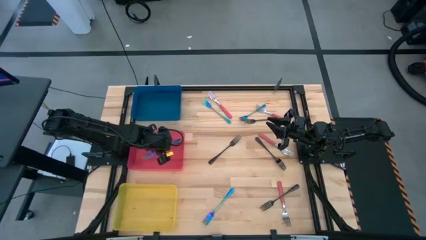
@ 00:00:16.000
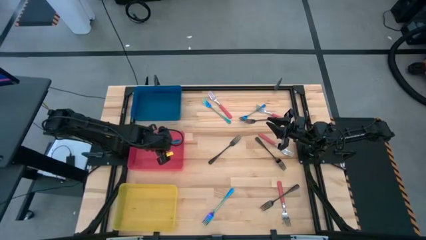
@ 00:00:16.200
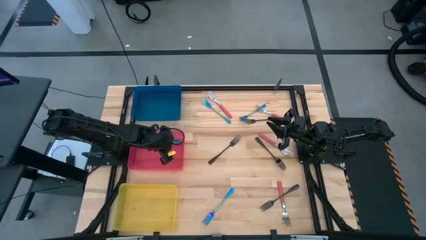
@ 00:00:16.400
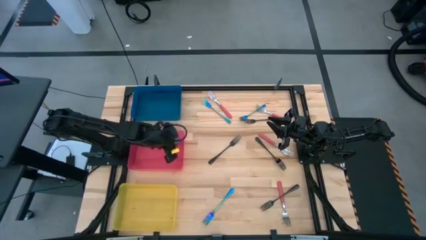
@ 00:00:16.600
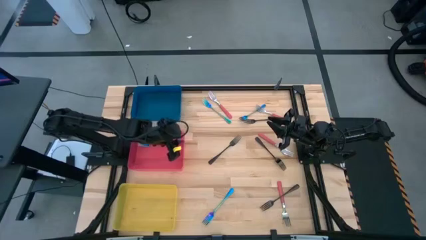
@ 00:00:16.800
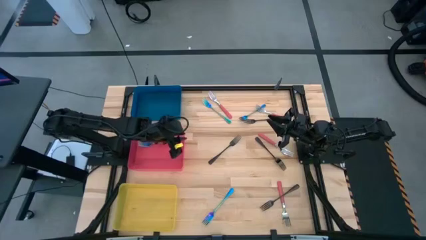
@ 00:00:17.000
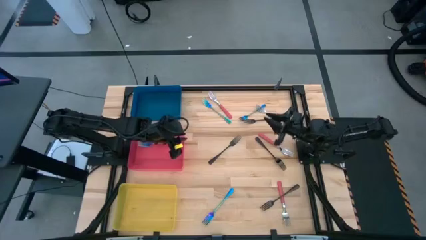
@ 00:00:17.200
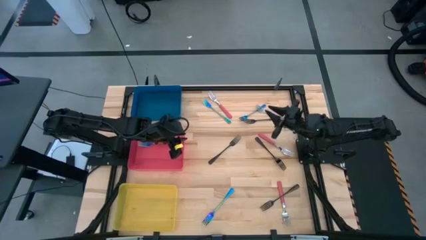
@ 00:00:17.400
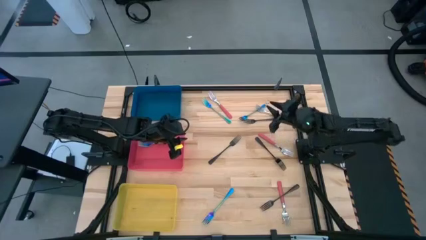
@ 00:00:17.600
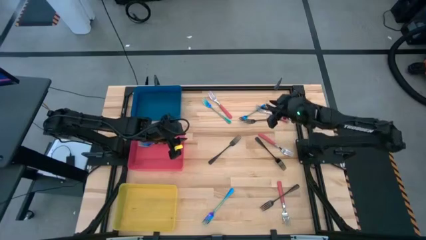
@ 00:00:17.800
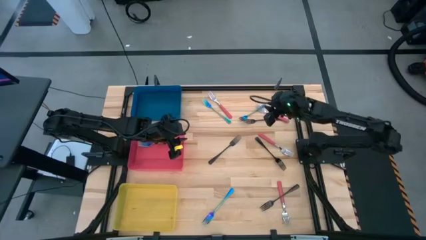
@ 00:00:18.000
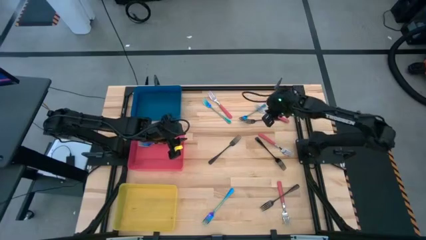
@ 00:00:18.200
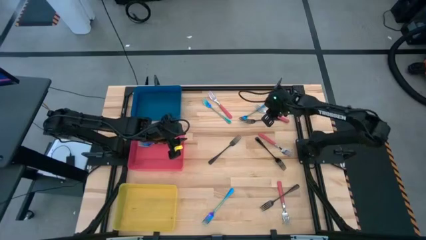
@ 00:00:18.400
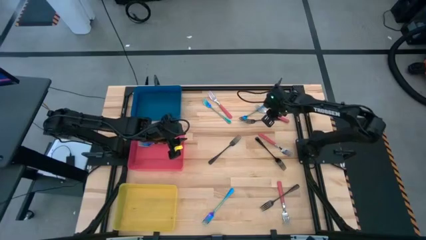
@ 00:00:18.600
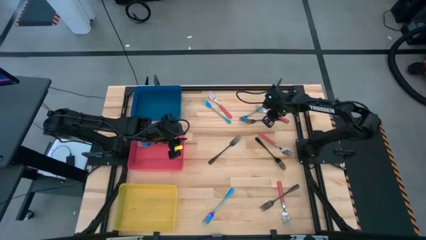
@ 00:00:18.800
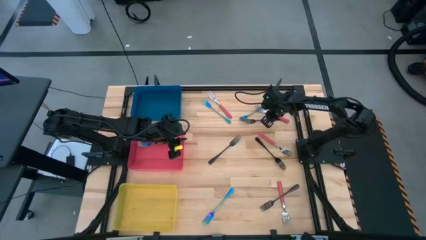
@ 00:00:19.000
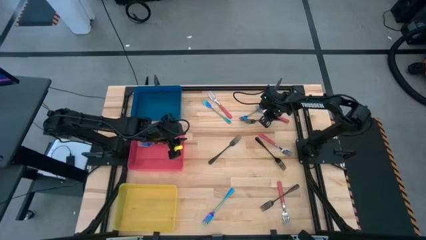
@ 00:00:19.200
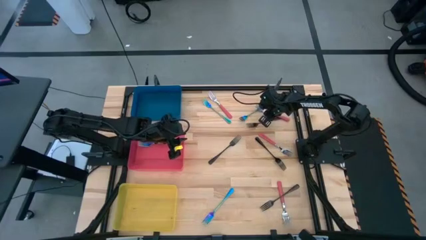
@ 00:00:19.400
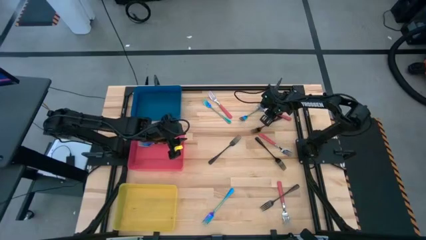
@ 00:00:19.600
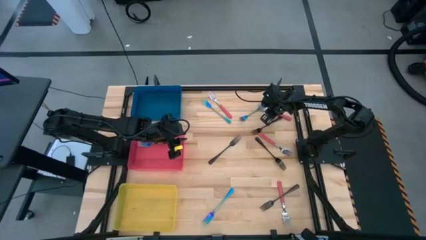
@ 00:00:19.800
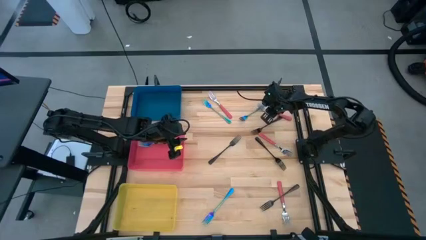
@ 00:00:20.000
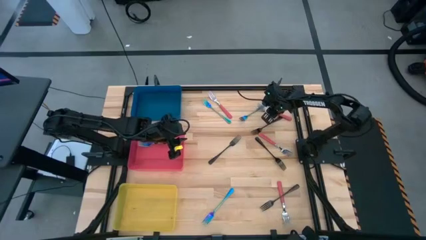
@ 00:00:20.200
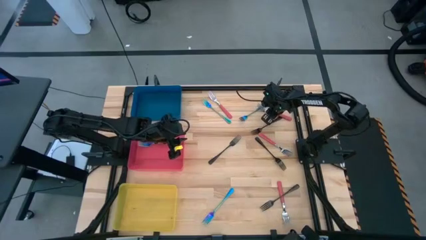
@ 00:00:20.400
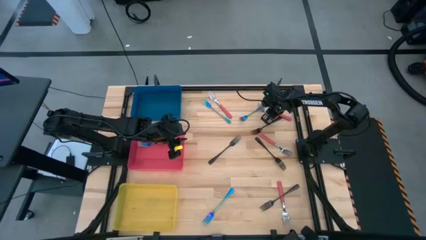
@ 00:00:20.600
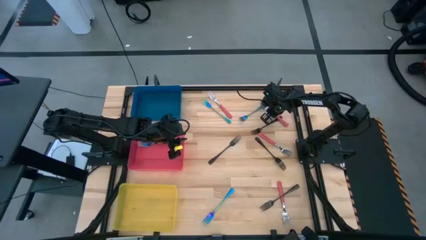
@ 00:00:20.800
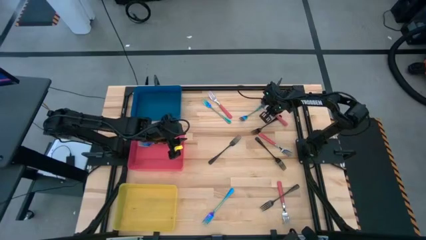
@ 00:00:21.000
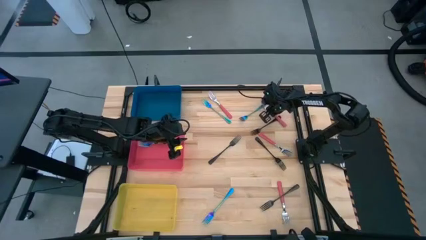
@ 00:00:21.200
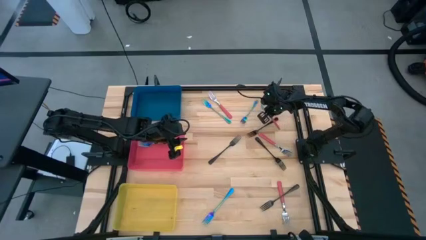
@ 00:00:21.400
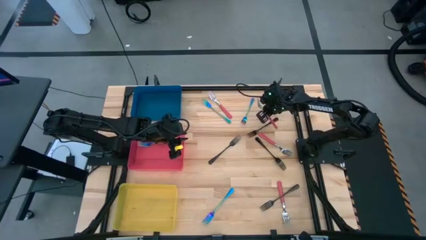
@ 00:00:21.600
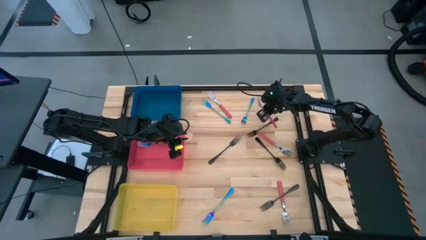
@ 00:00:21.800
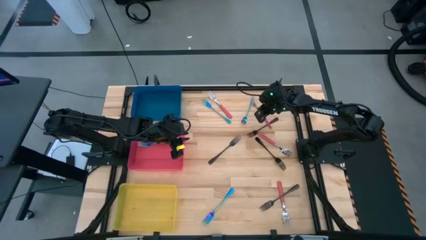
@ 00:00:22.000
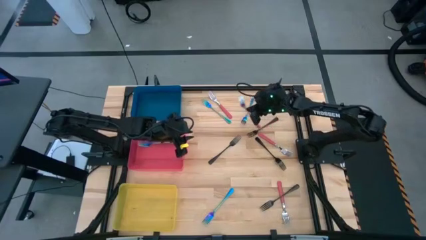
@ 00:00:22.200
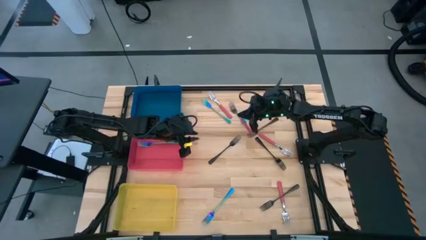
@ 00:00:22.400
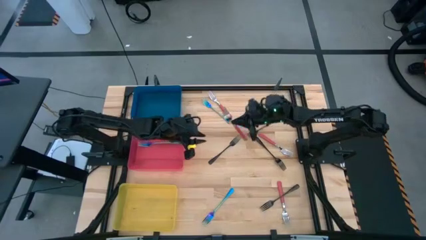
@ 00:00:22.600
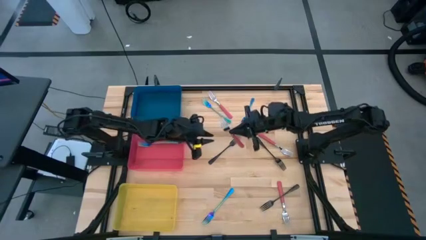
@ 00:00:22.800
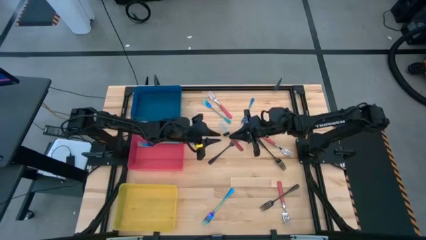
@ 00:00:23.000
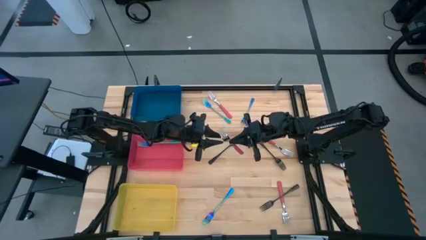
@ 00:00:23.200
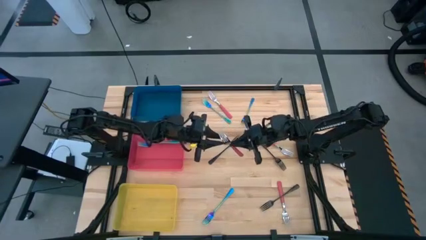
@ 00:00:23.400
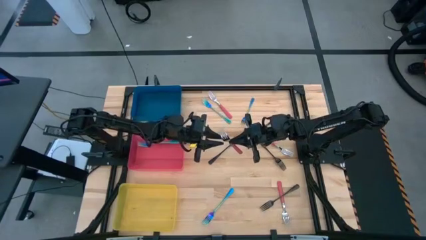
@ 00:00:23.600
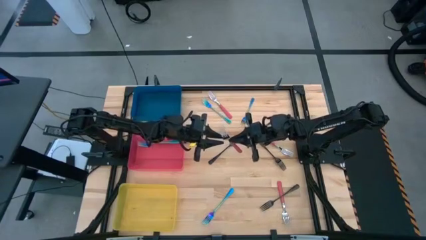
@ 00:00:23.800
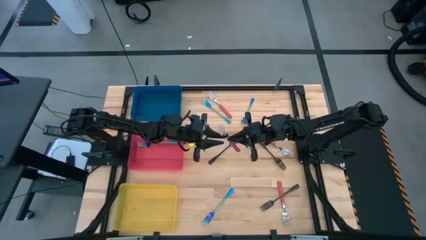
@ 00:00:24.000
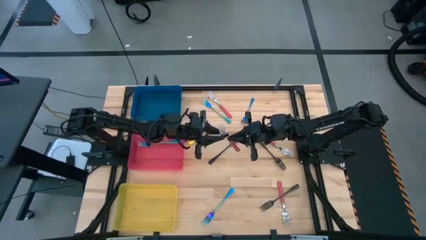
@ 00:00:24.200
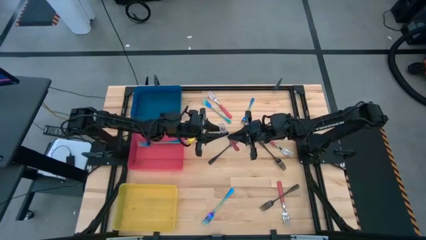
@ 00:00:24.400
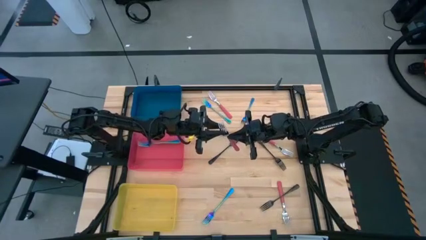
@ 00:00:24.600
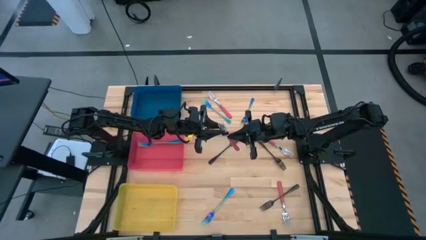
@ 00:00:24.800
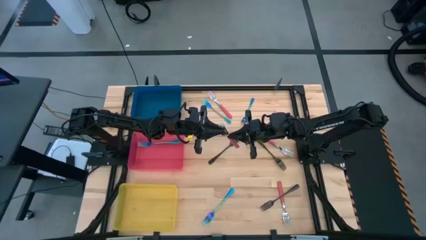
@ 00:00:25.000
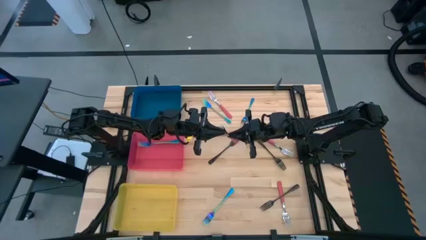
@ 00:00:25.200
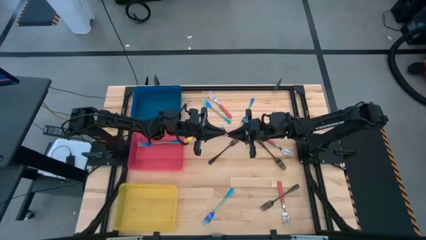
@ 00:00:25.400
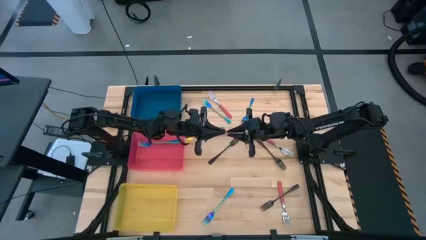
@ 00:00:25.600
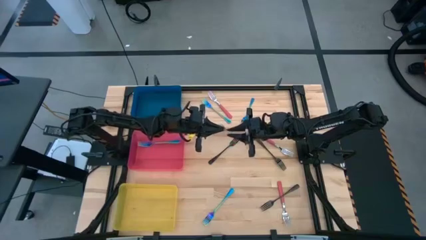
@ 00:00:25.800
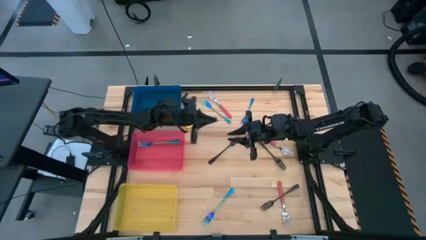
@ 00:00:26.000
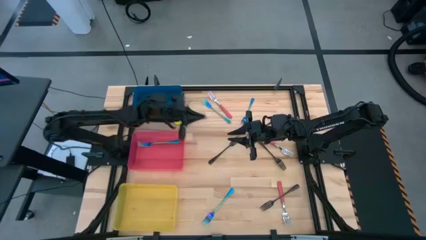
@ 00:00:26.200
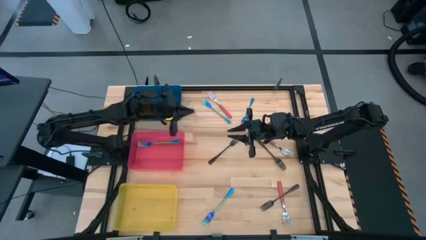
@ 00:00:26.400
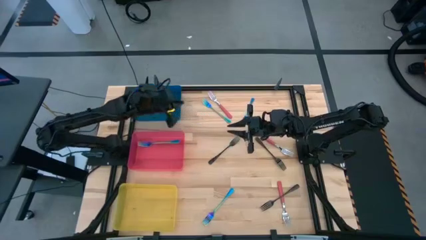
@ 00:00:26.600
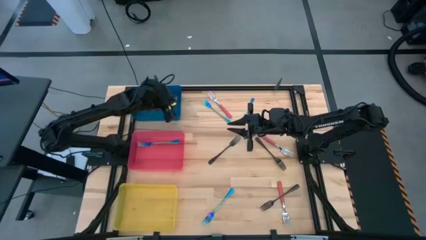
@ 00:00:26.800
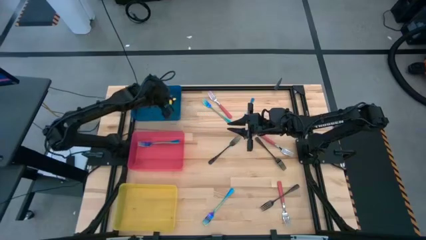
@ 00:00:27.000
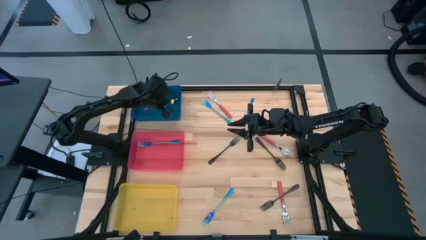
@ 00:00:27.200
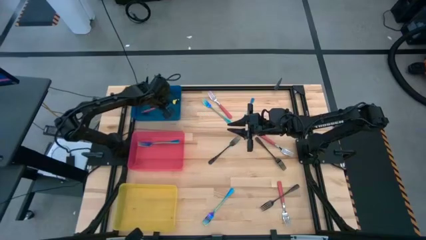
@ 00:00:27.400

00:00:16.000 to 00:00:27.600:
Task: Sort silverware by color (type)
Put the pink fork into the blue bin

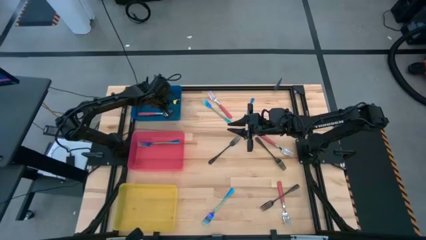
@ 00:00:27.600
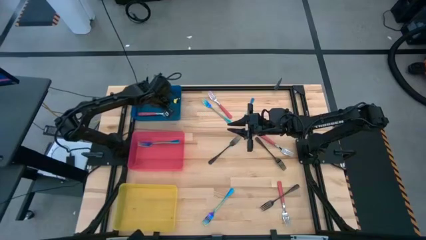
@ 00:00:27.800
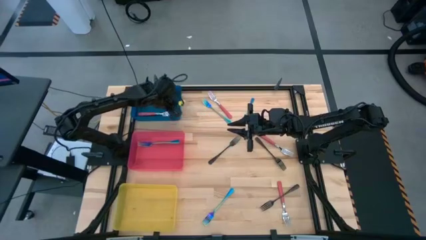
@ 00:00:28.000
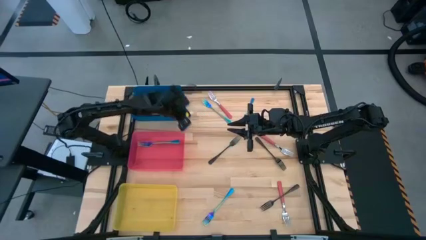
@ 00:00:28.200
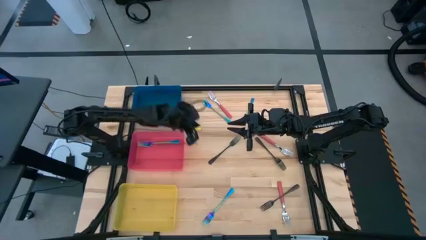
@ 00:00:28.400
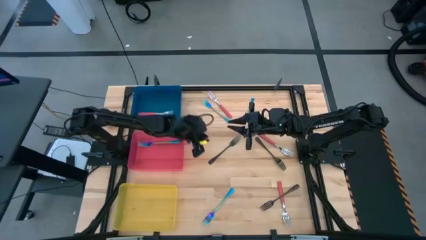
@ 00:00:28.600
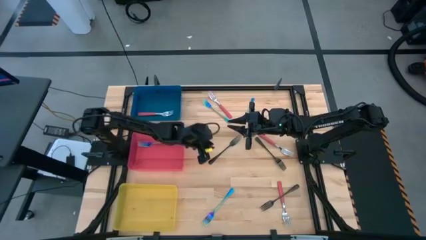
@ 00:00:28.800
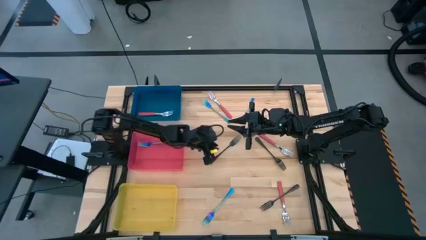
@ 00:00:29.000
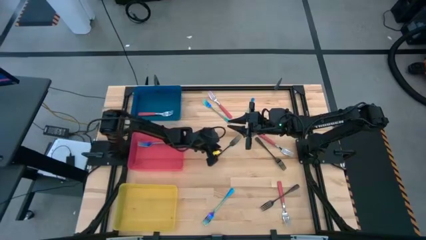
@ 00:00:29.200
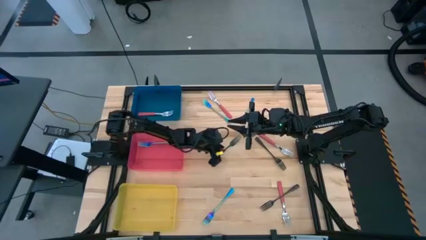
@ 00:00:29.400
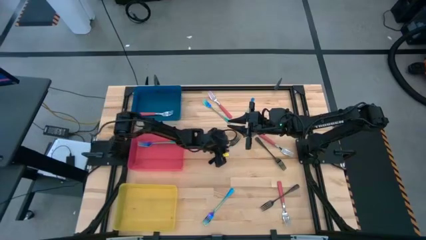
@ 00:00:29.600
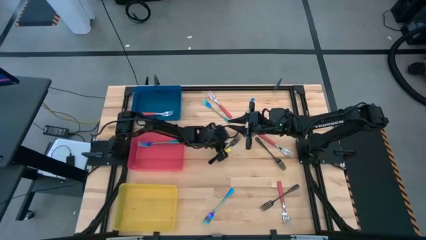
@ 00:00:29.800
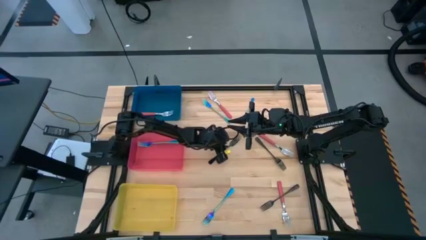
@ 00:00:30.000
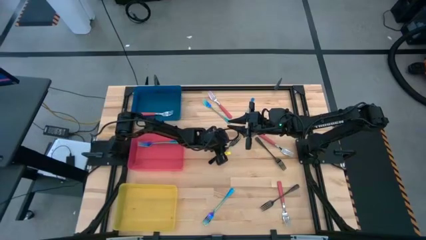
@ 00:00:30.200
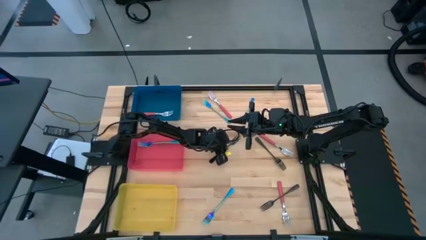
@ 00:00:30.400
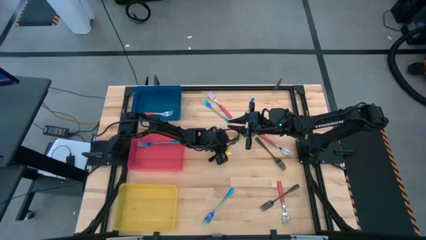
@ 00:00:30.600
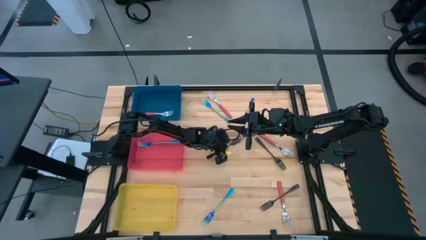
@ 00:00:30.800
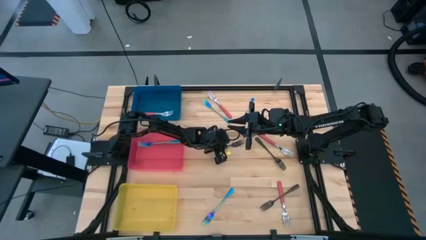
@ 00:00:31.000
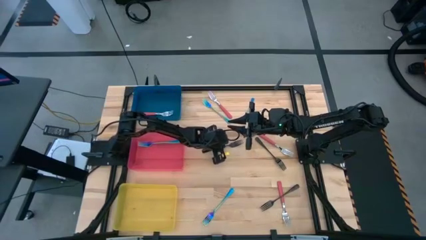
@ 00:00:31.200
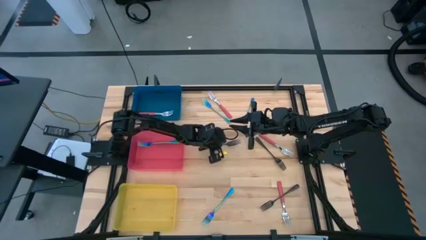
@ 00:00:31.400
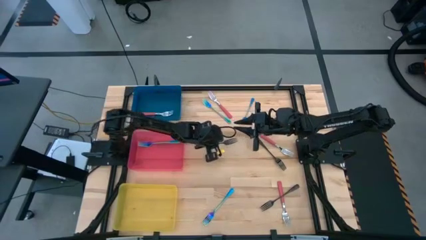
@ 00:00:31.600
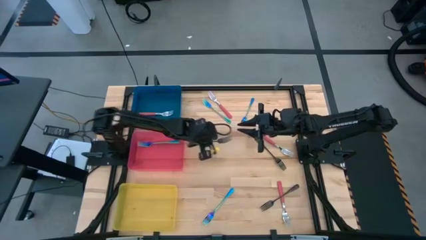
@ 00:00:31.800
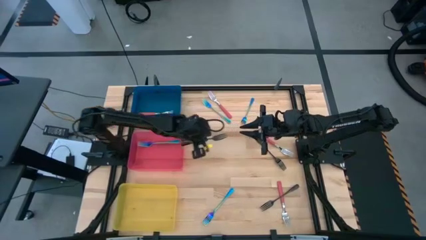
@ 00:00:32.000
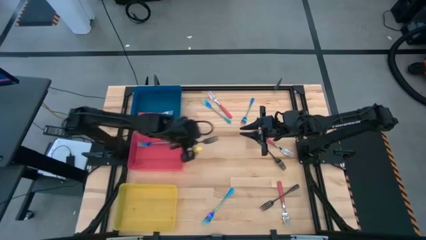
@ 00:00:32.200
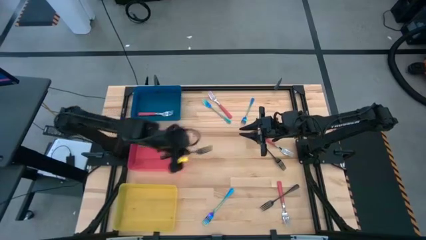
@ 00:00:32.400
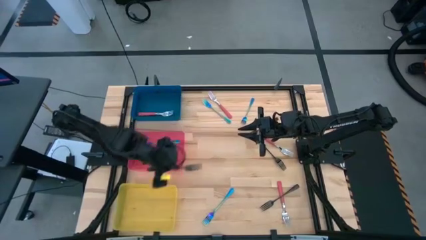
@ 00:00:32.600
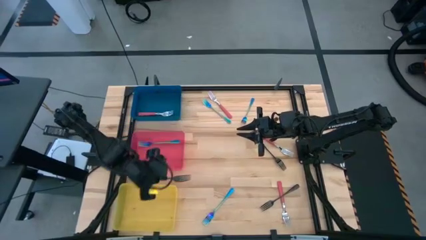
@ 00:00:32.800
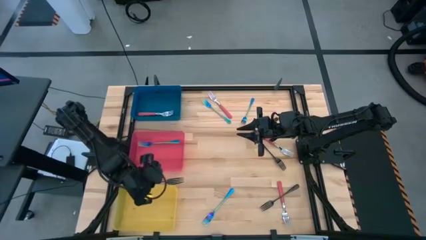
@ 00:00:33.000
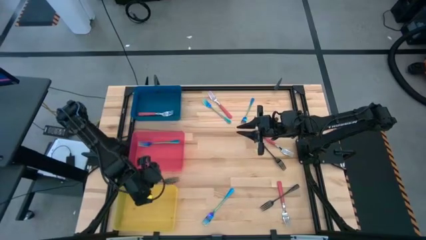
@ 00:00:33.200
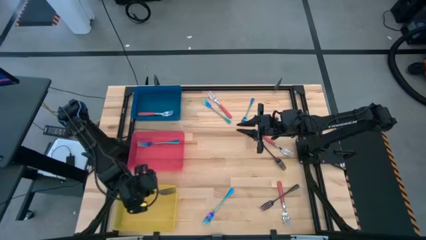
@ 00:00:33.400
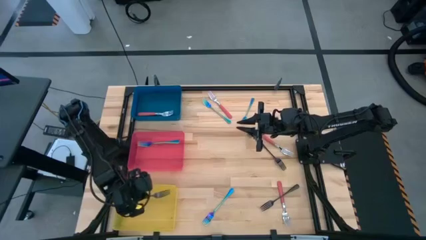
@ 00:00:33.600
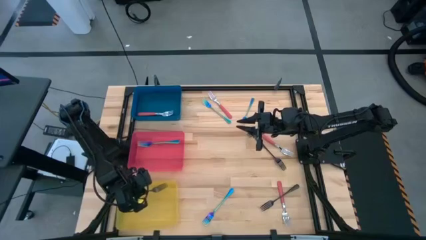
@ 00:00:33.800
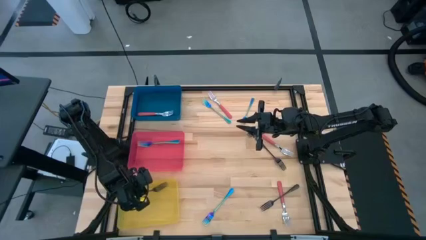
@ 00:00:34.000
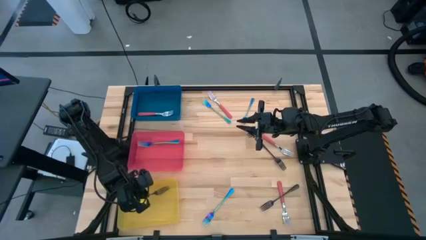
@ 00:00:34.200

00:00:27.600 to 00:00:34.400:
Put the black fork into the yellow bin
